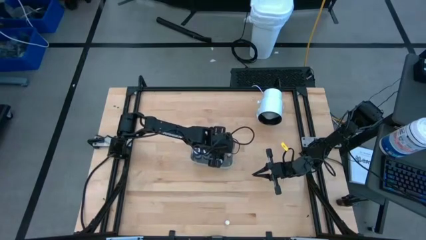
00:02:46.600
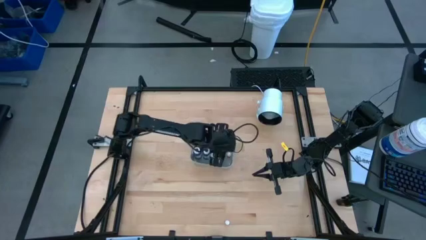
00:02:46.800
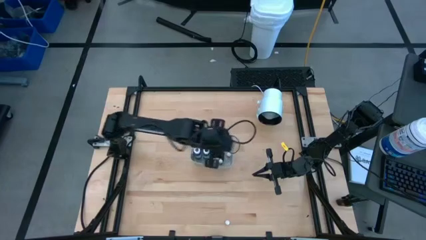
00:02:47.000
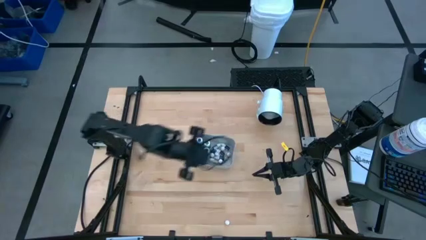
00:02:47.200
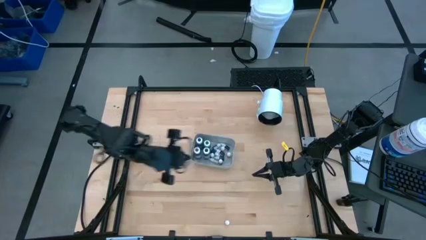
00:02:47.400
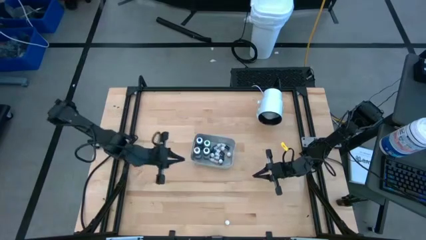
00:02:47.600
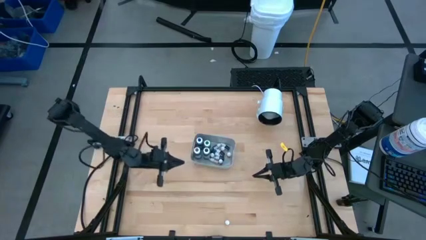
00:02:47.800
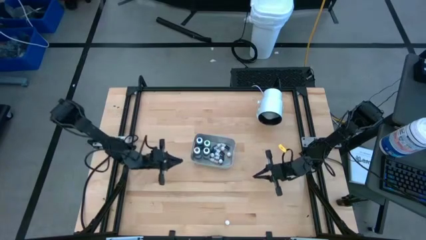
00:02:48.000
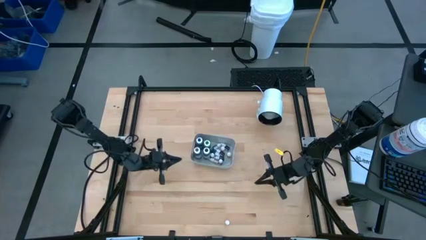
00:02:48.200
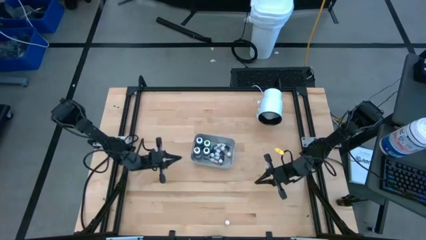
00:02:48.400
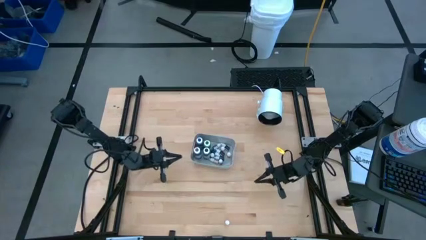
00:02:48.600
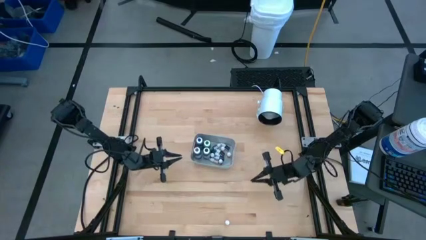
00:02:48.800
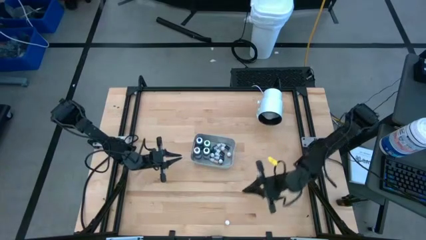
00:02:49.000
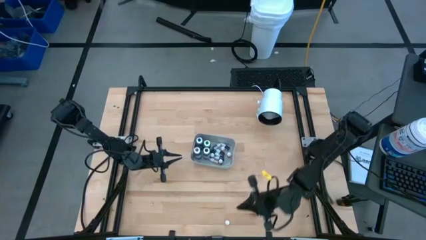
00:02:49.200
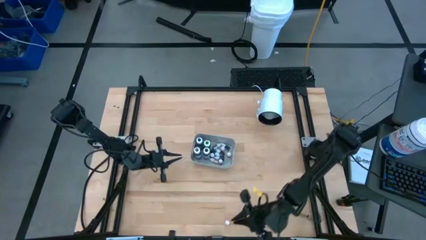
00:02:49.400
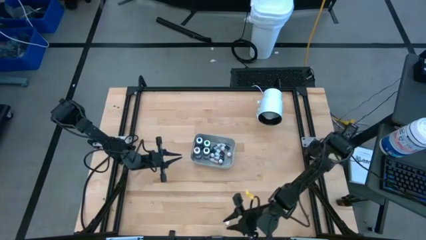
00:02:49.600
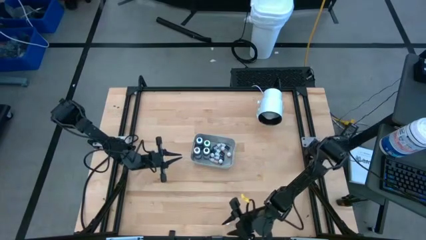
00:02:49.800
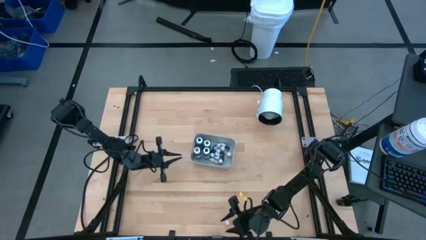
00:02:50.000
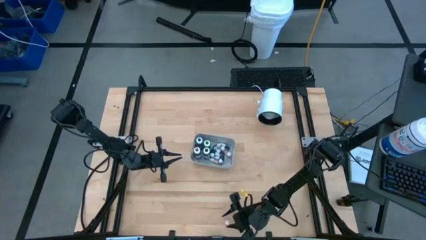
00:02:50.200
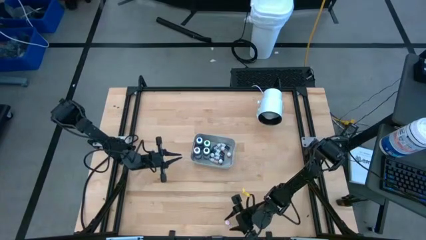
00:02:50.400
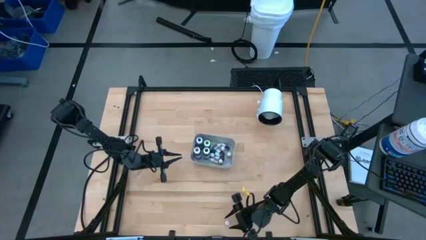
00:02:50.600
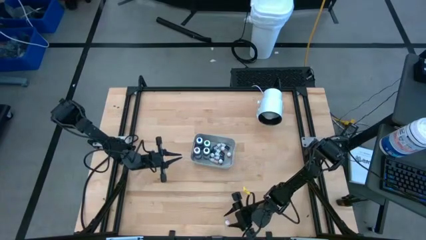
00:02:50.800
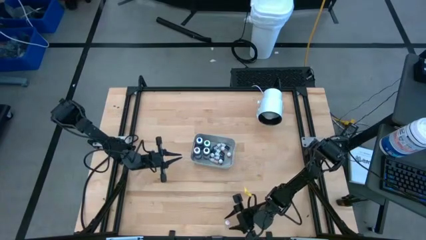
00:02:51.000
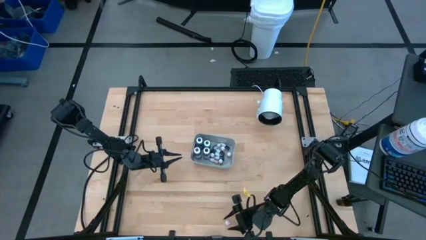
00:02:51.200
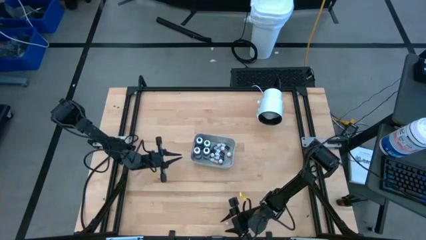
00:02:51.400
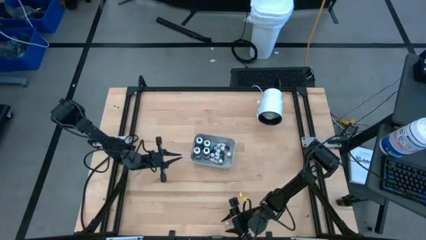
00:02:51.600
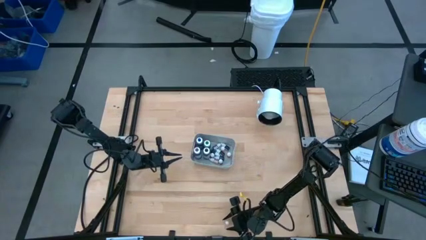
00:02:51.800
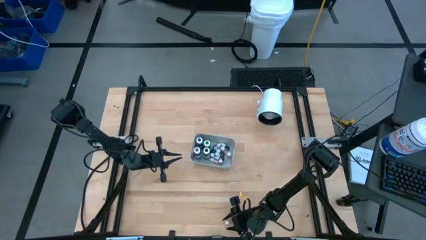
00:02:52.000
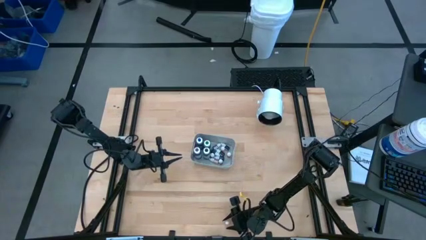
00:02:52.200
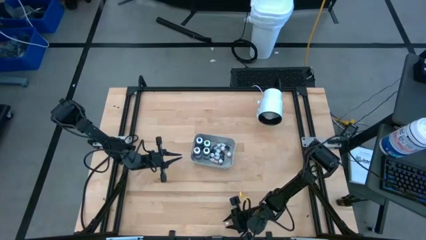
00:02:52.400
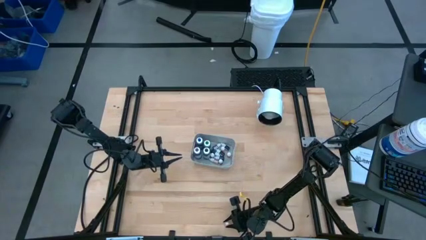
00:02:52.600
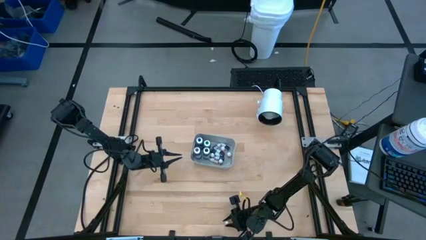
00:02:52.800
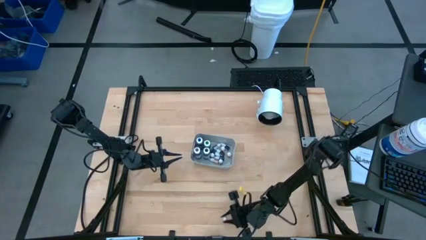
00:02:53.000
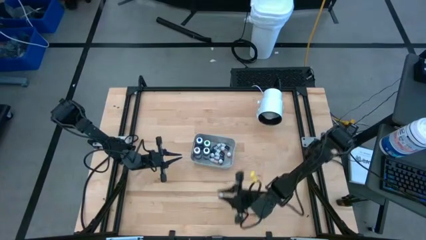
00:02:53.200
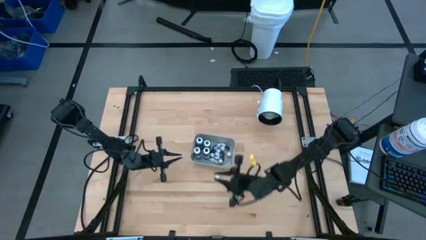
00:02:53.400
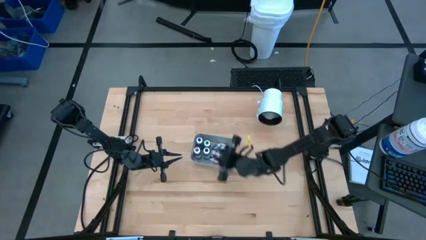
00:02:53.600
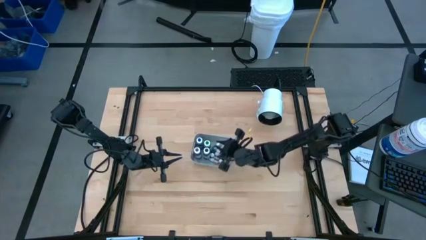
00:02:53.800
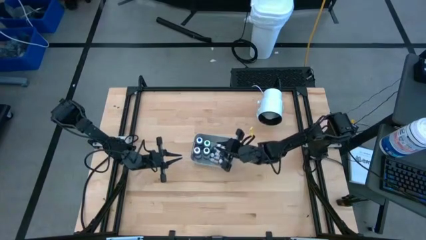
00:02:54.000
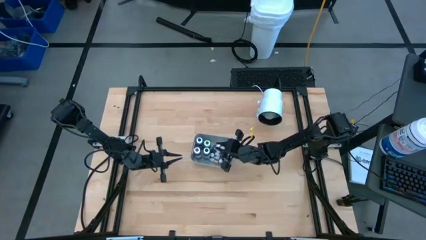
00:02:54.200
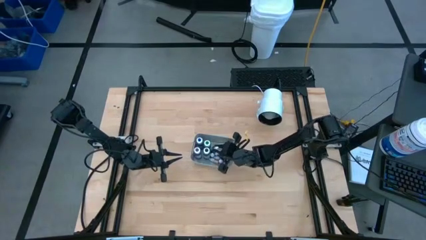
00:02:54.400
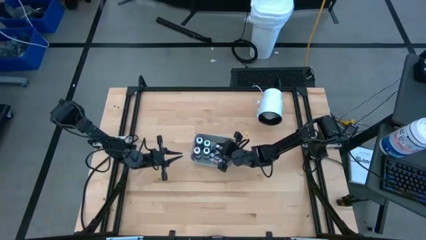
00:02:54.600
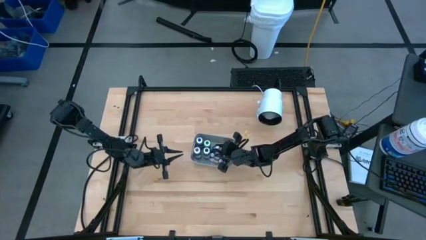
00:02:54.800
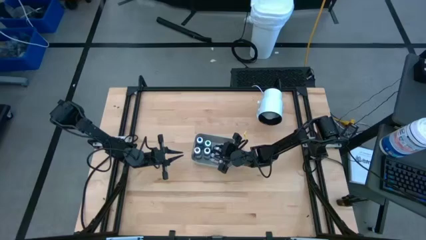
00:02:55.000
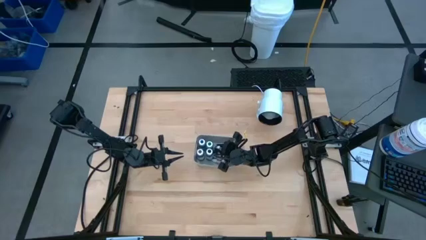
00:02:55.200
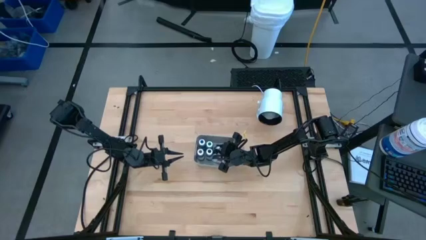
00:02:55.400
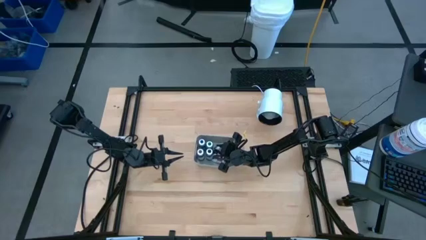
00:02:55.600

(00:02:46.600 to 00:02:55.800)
Task: Pick & Place food coloring
Put the orange food coloring bottle into the gray bin

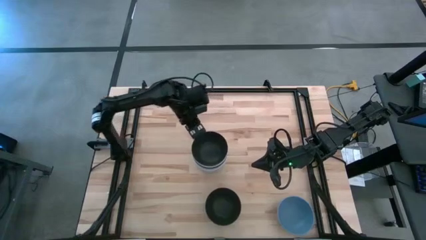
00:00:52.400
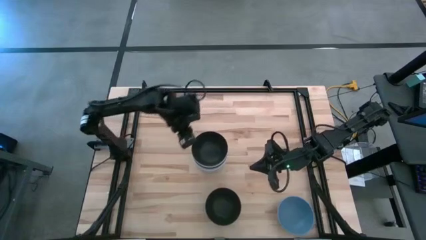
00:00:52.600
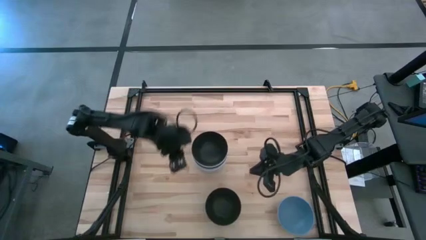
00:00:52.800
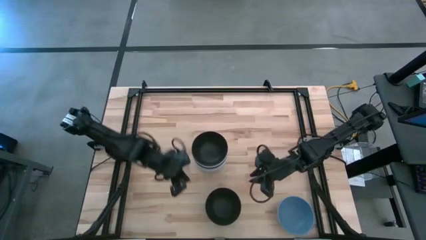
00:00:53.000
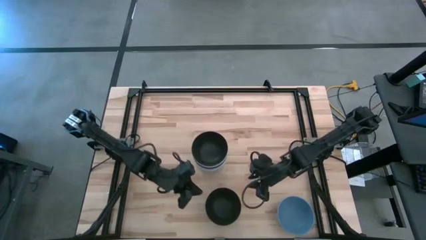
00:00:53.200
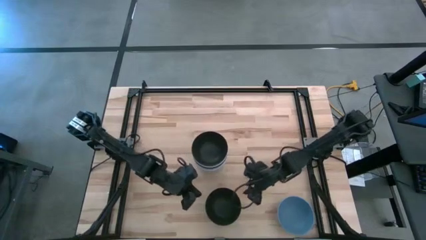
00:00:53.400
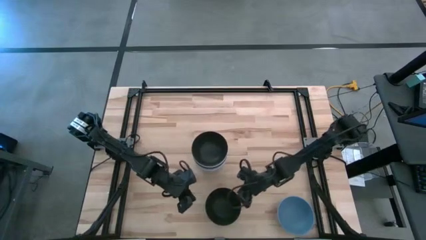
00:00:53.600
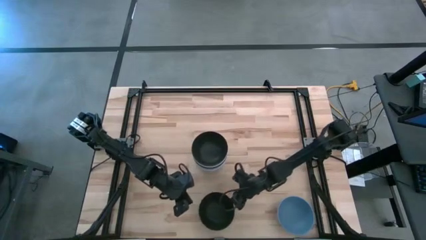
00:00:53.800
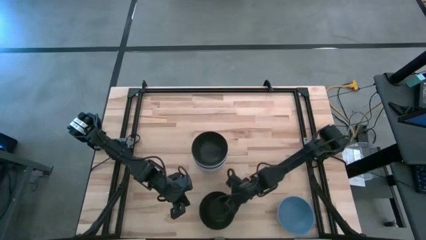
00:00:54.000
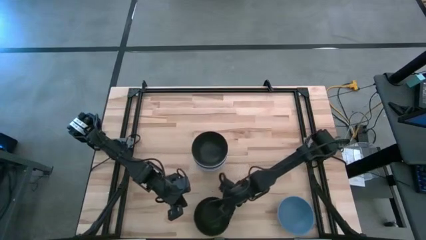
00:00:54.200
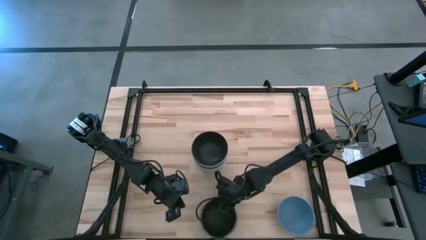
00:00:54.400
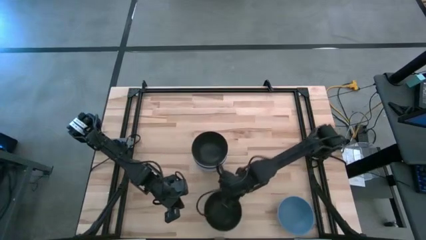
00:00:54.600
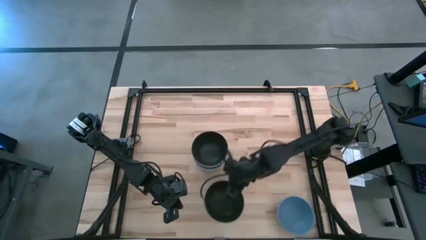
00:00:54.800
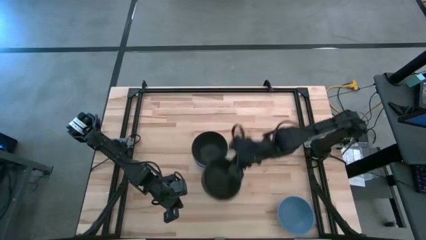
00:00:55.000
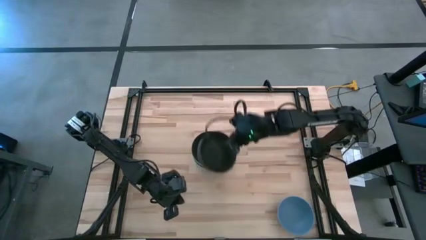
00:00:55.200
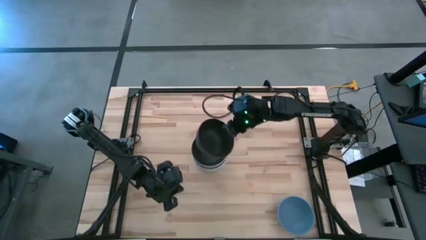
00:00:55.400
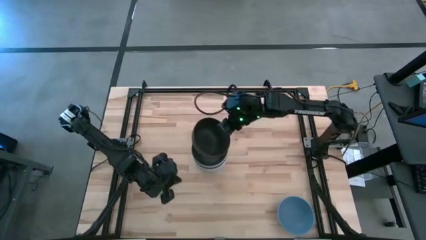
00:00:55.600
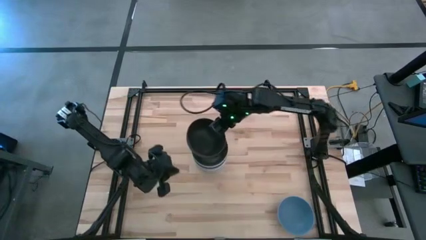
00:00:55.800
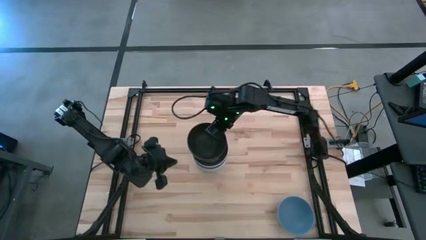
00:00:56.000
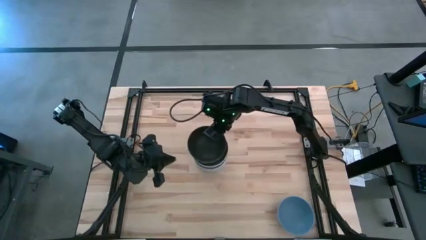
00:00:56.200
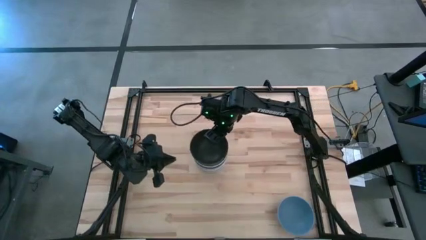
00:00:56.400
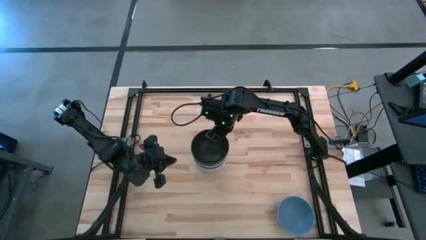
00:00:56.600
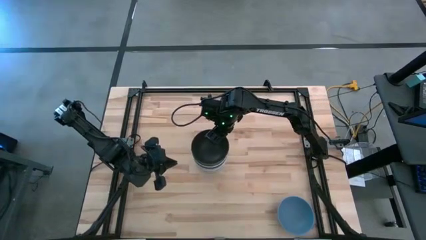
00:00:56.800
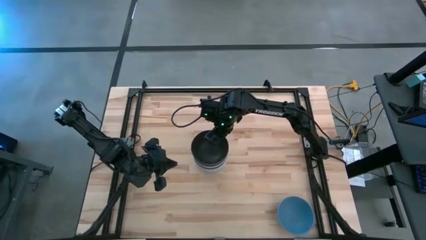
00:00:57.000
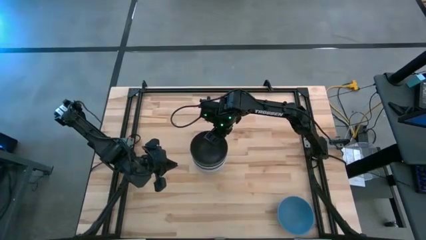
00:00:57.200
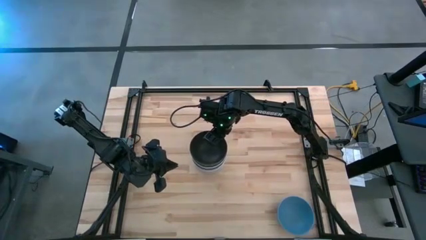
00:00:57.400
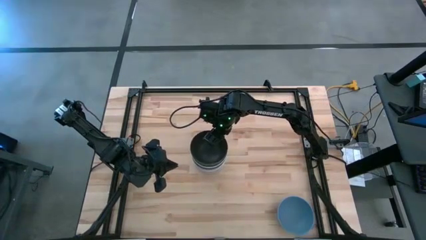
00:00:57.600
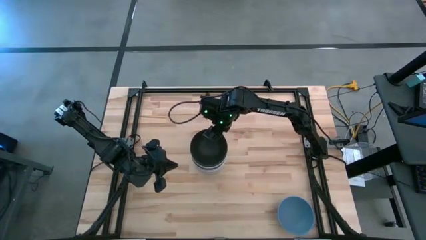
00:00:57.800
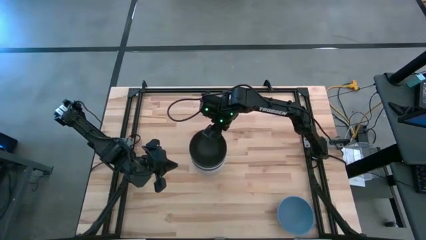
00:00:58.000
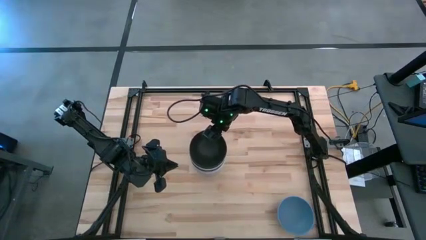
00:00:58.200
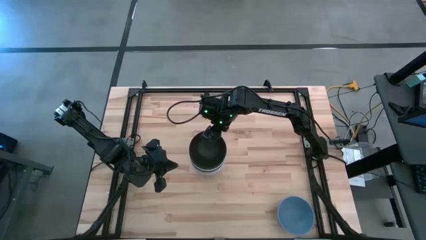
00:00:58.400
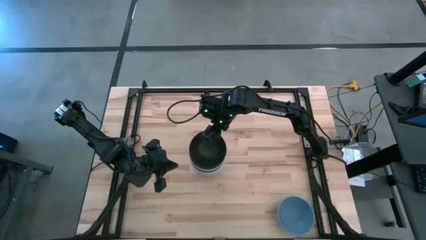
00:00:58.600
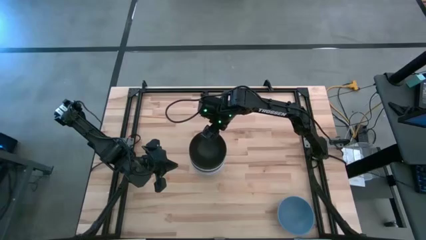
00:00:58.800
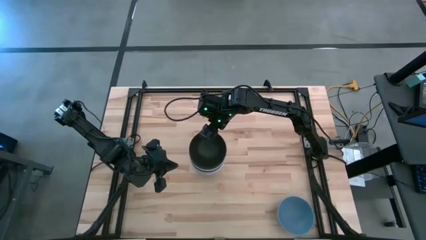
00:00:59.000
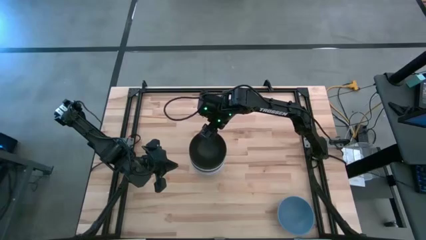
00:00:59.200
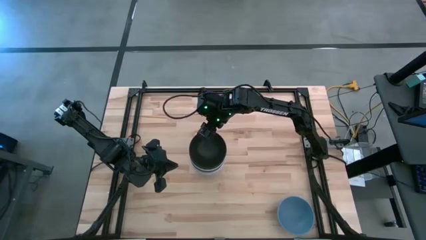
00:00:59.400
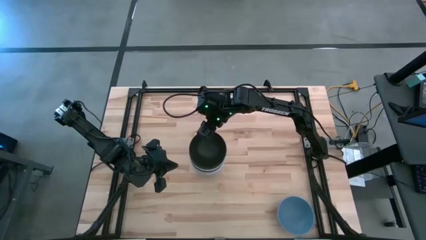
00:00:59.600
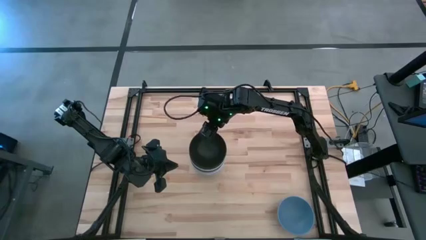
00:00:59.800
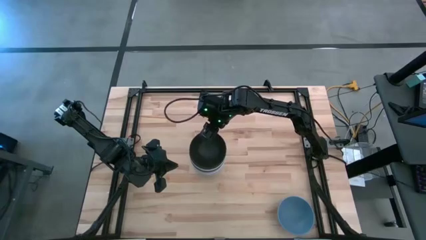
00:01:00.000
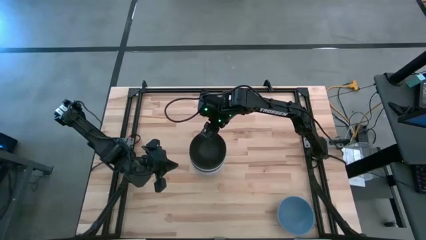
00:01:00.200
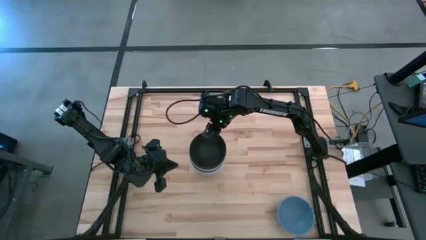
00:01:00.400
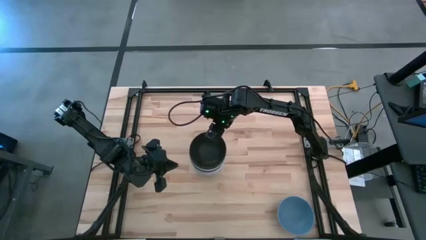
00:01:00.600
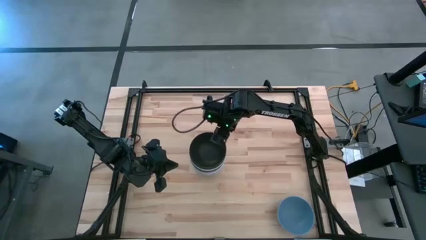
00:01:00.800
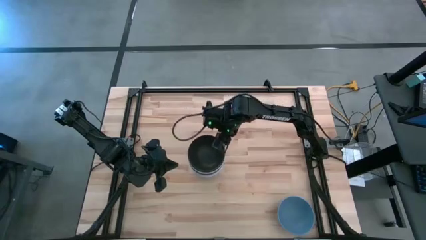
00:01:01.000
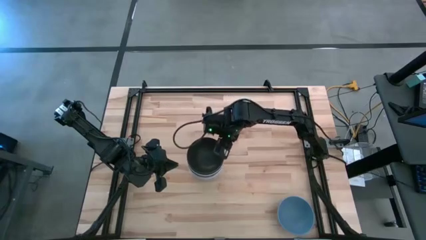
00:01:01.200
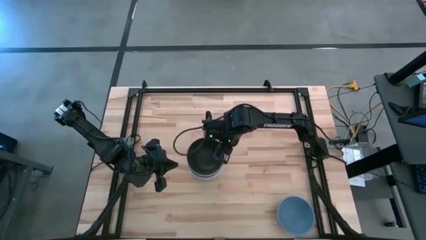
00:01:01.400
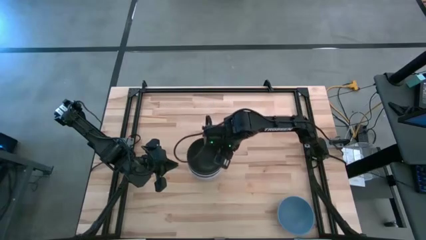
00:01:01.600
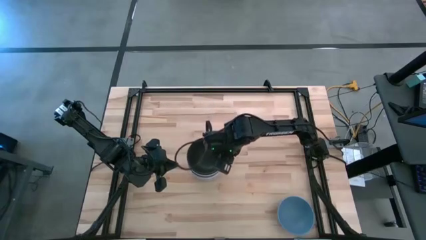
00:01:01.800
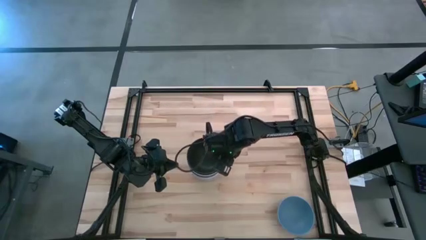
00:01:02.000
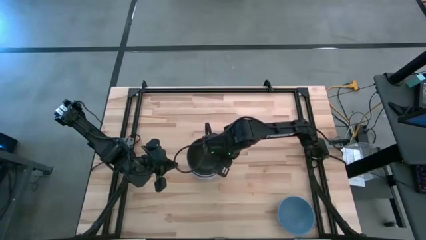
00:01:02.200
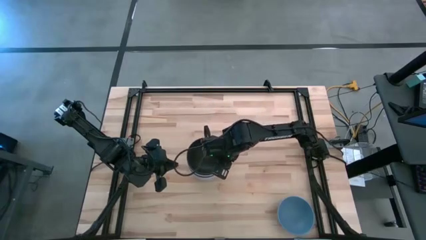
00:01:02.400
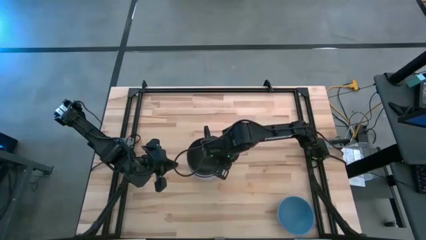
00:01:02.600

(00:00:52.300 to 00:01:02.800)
Task: Nest bowls inside each other
Stack the black bowl on top of the other black bowl
